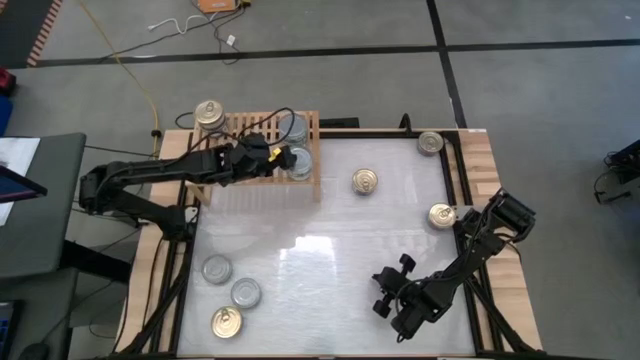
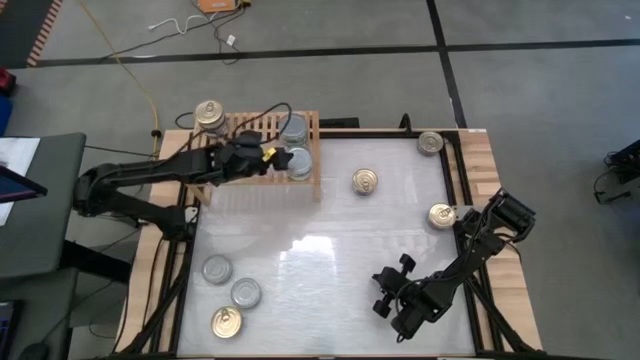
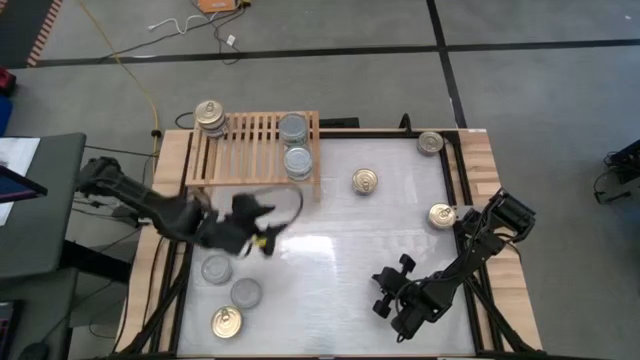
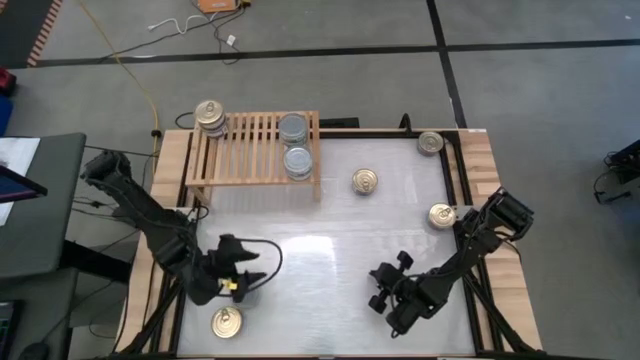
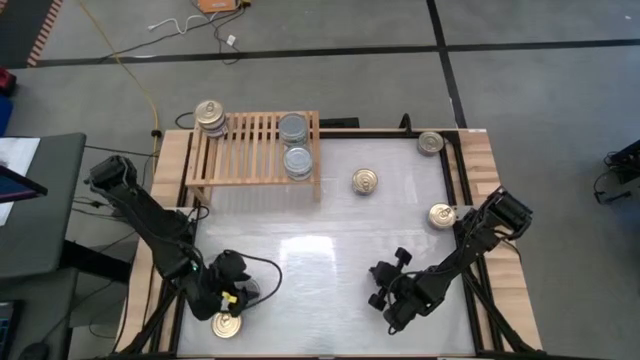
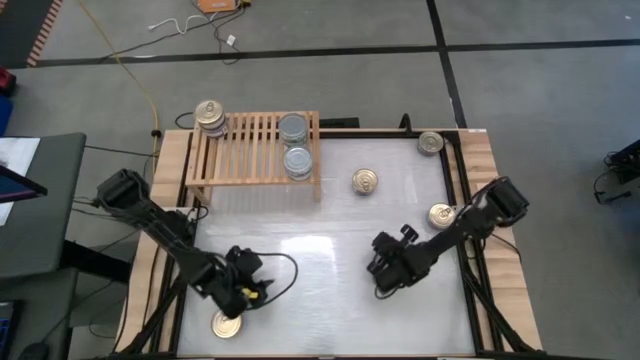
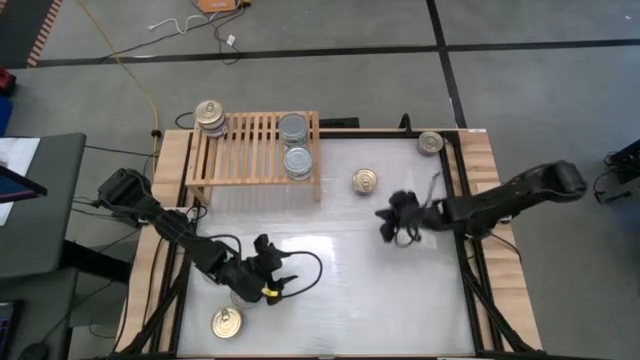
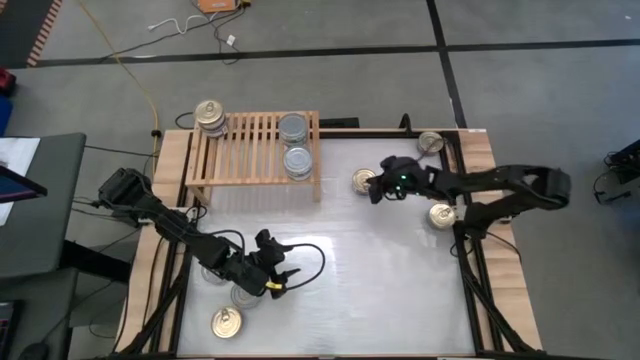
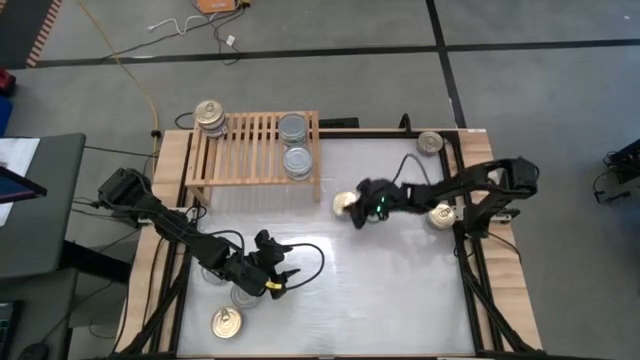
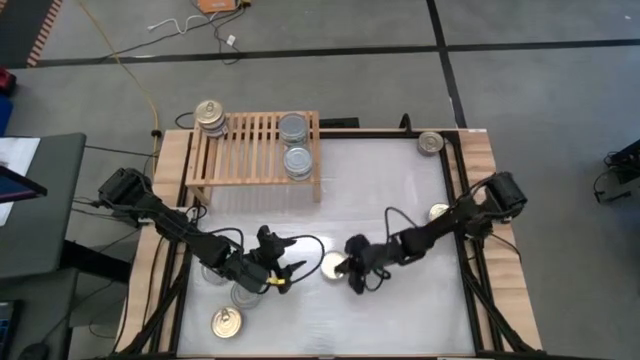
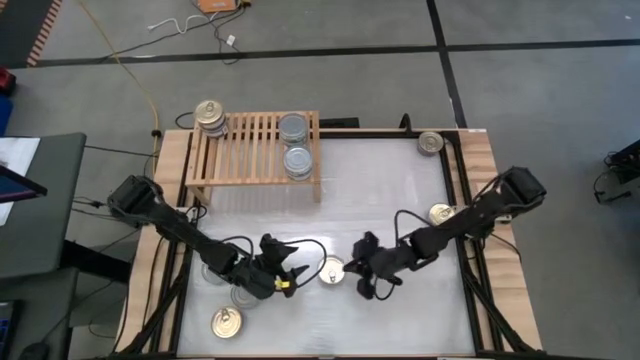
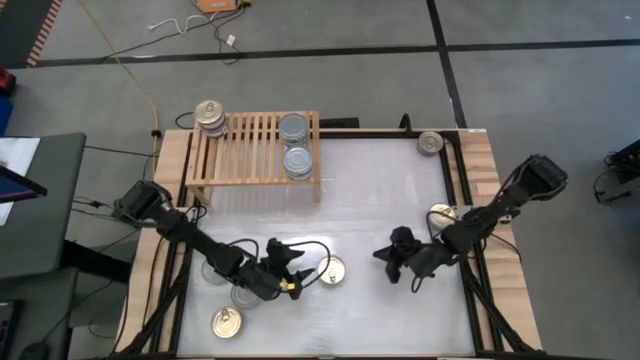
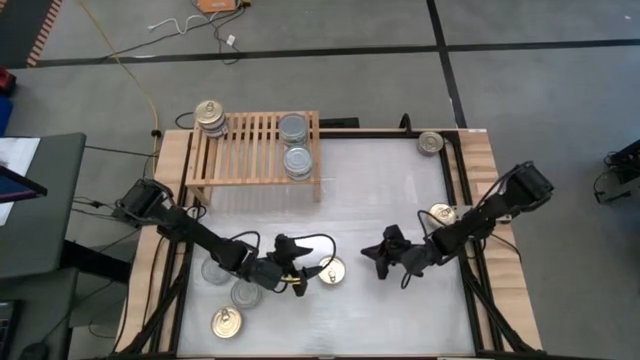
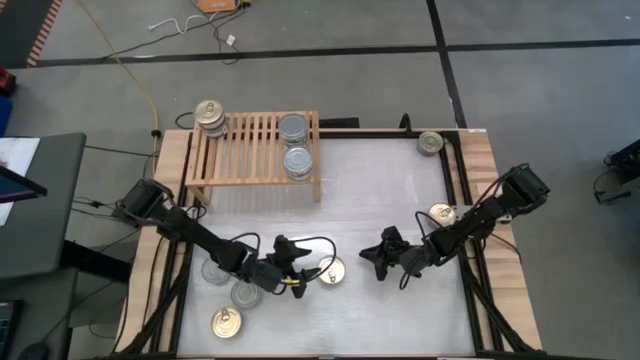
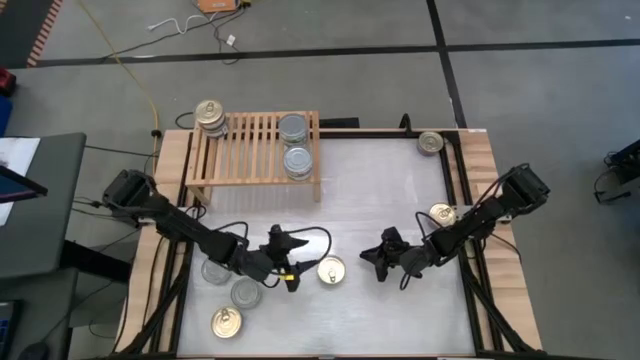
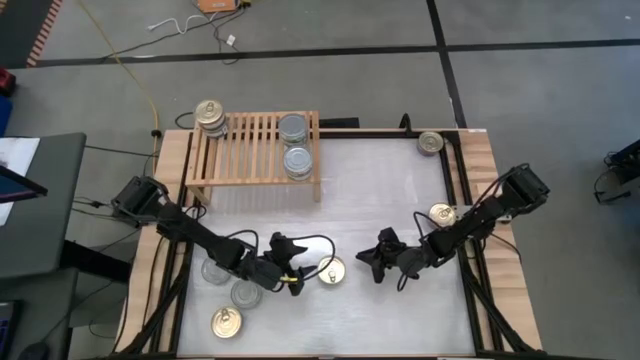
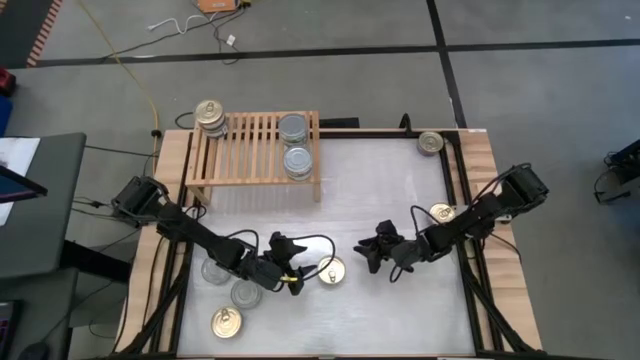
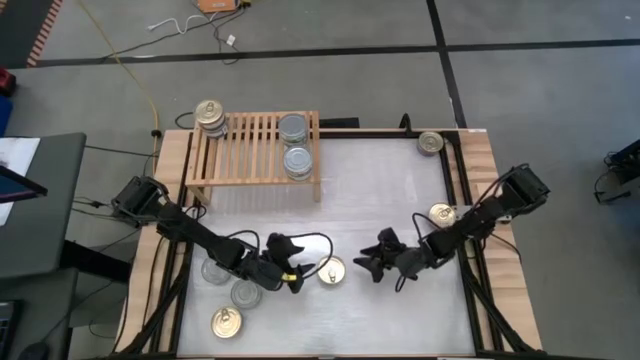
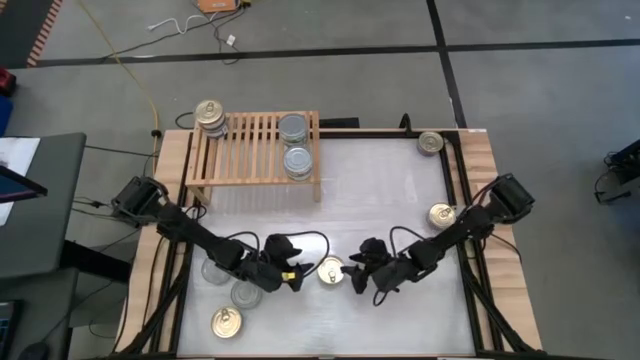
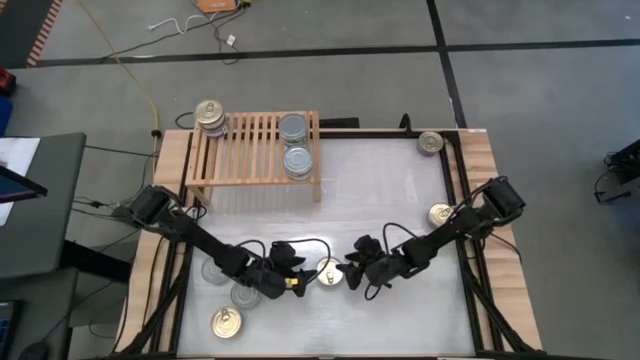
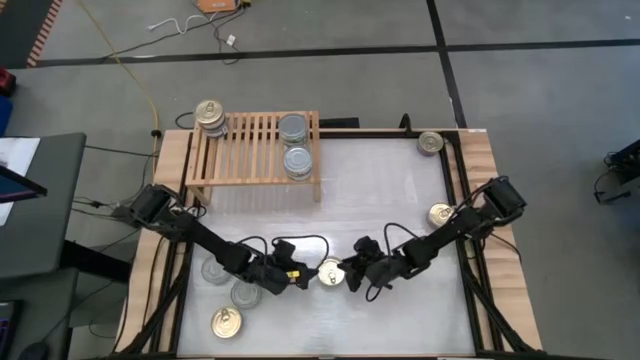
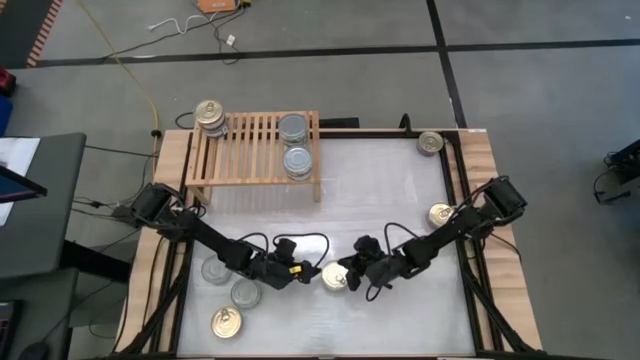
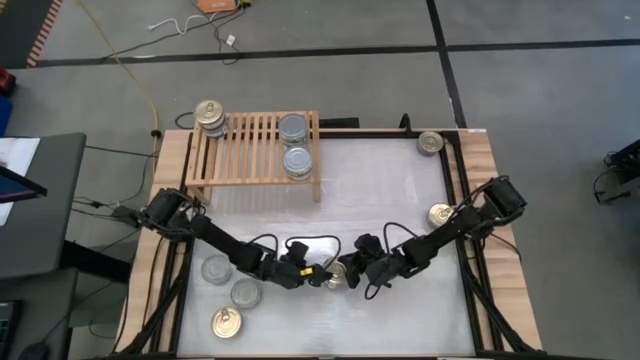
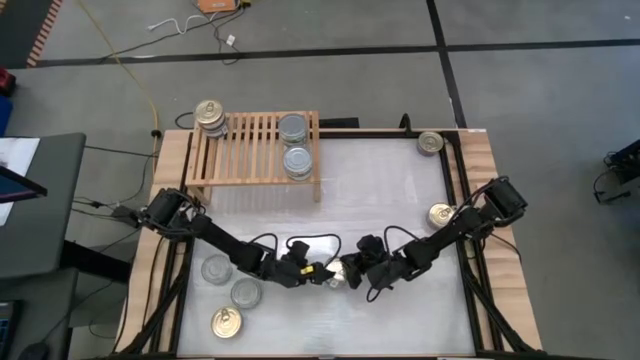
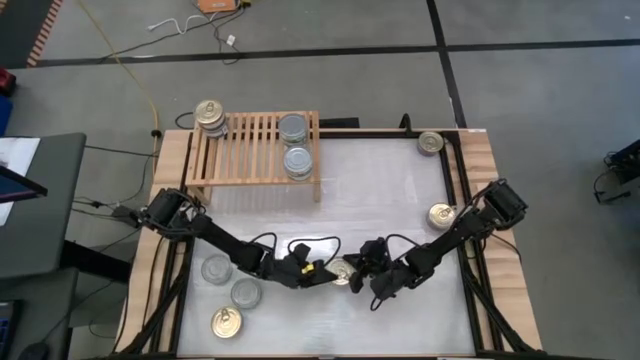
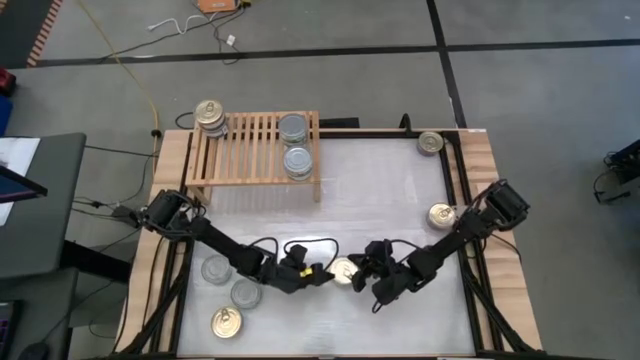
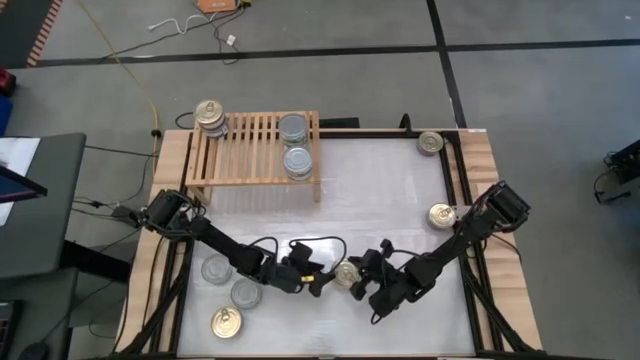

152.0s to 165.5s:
Task: Stack canned seafood by type on shelf
Put the blue tuna can on the shelf

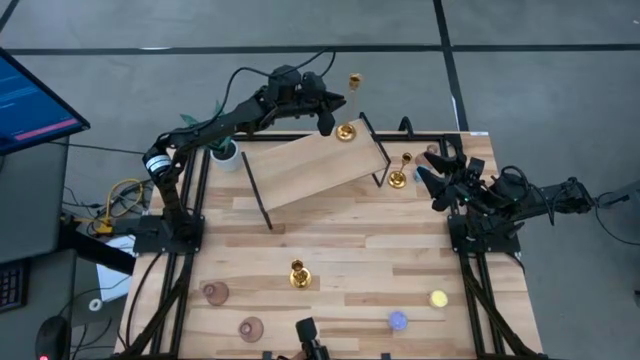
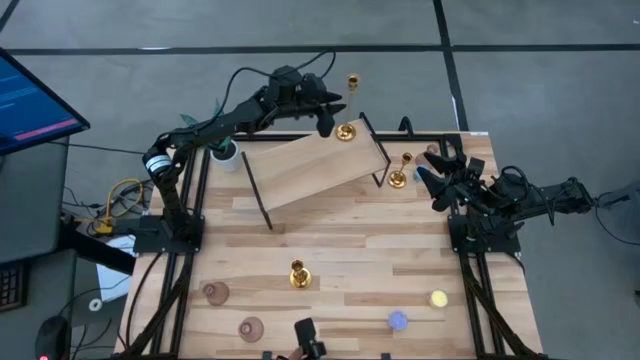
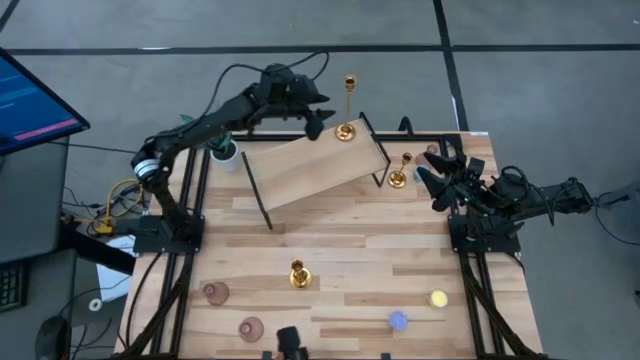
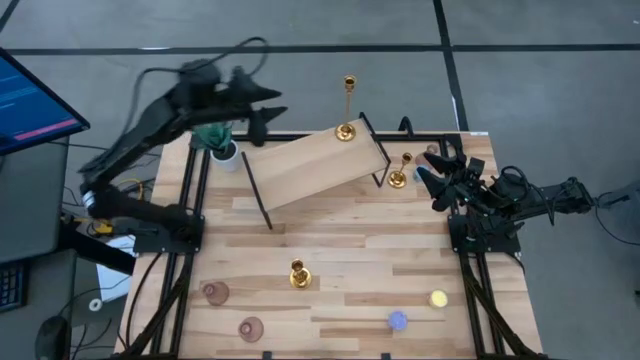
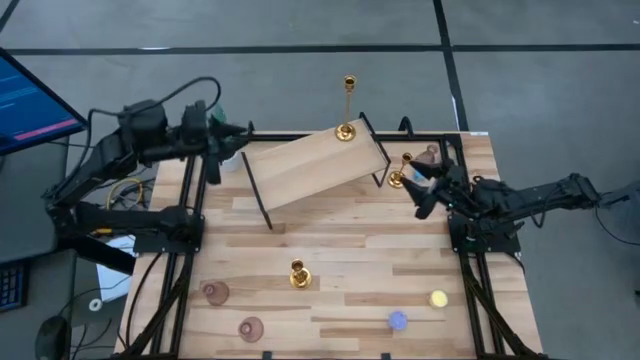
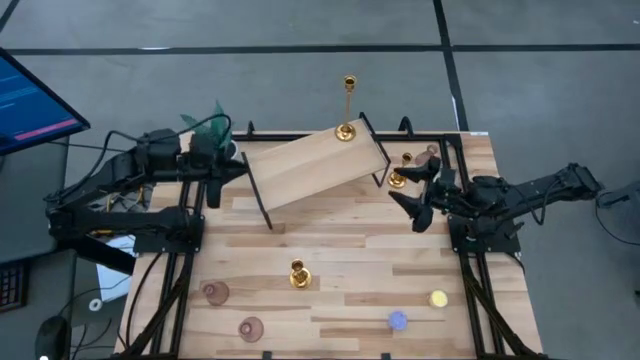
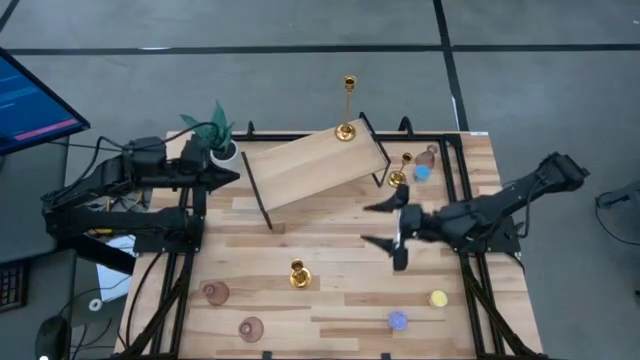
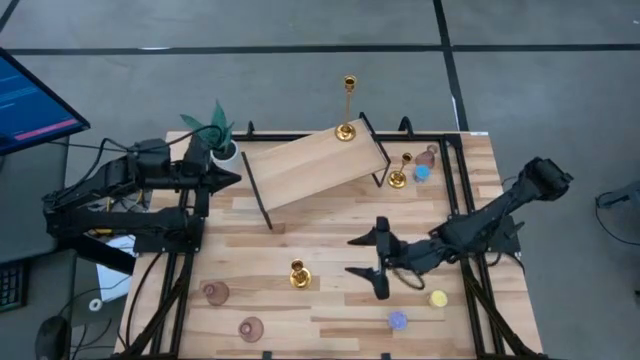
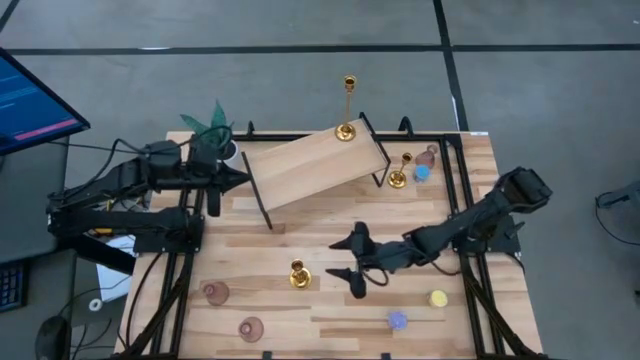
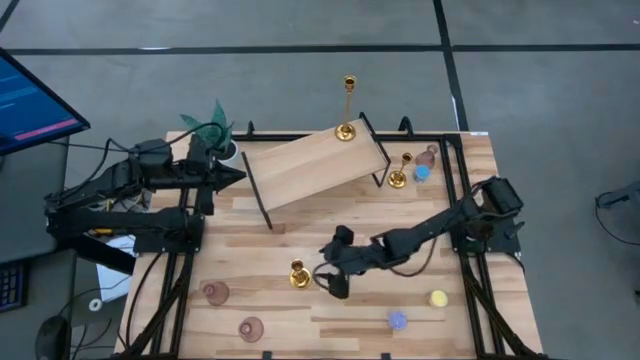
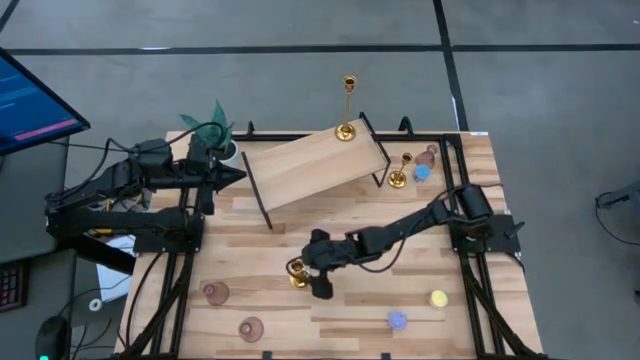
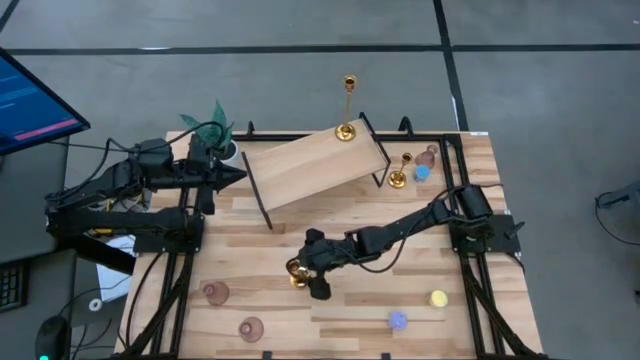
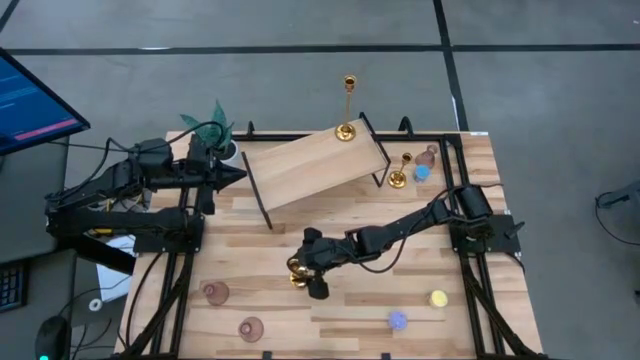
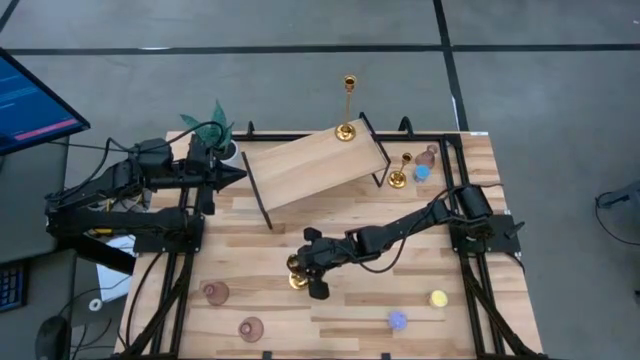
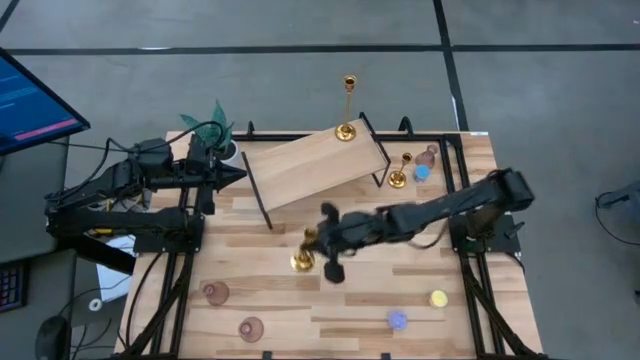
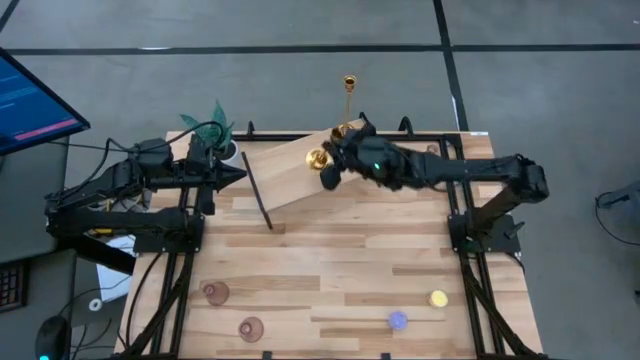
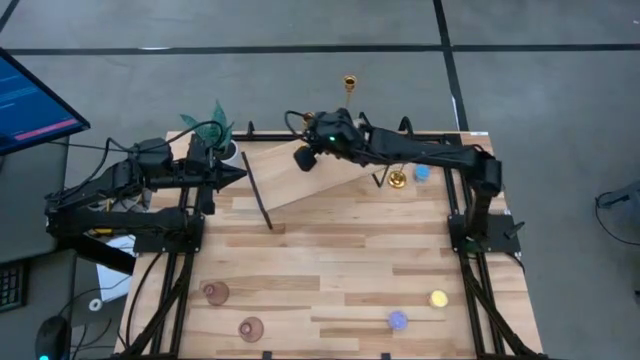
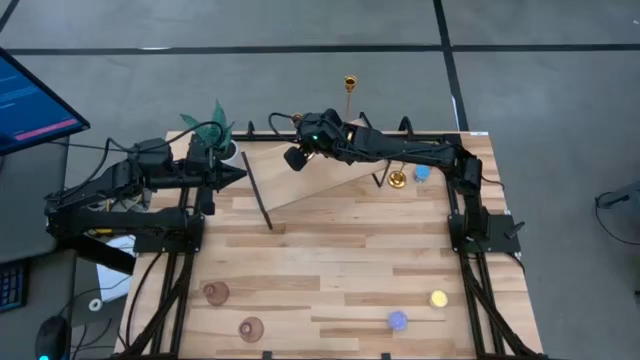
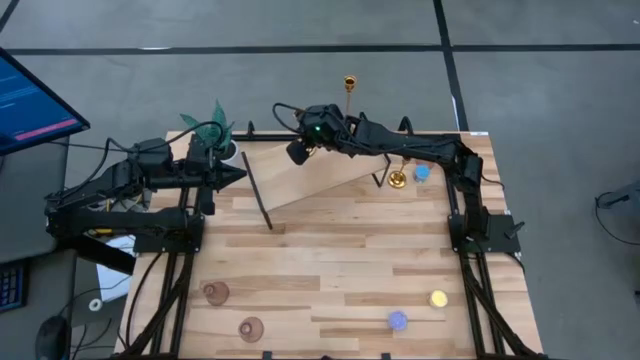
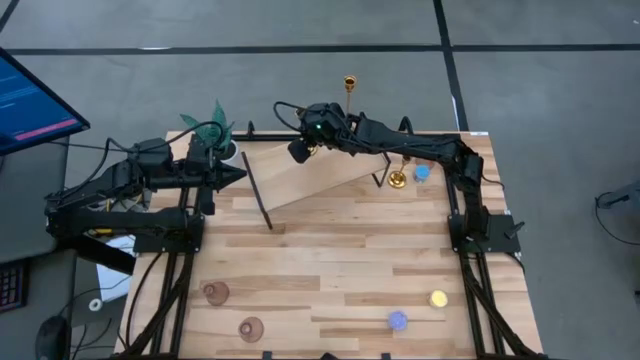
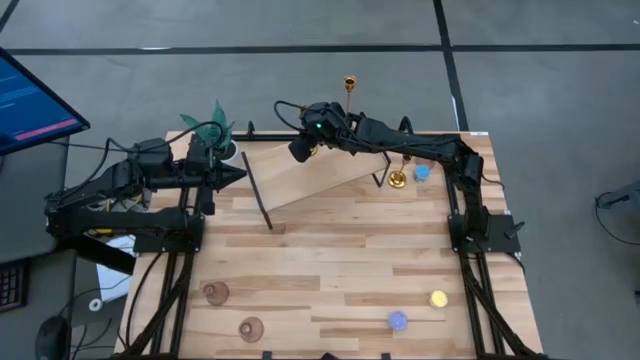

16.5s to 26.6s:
Task: Pick & Place candle stick holders
Put the bottom gold candle holder on the shelf
